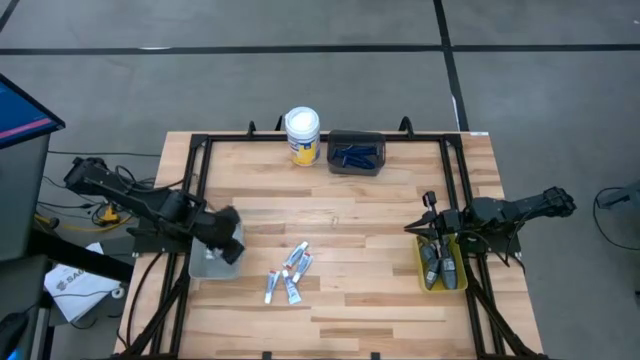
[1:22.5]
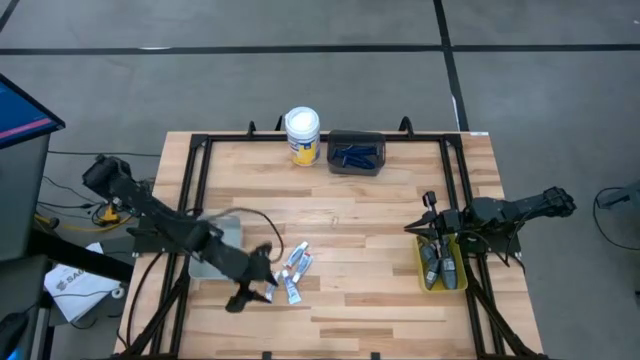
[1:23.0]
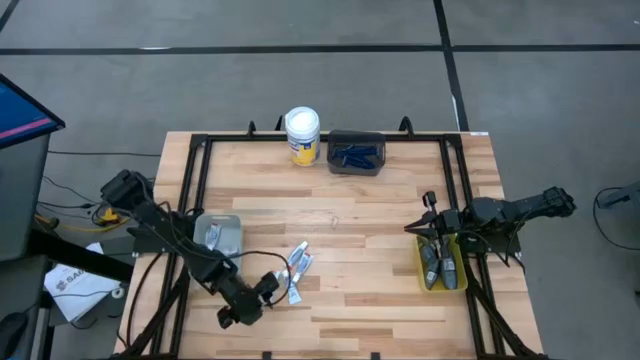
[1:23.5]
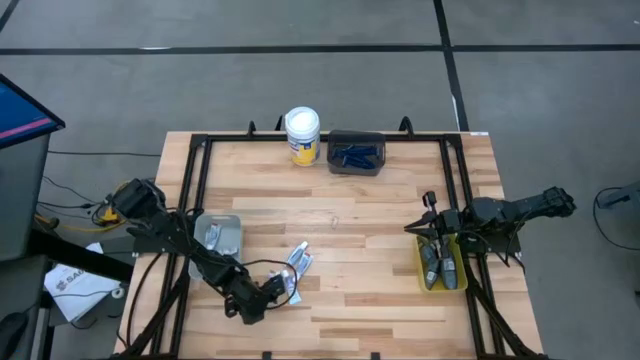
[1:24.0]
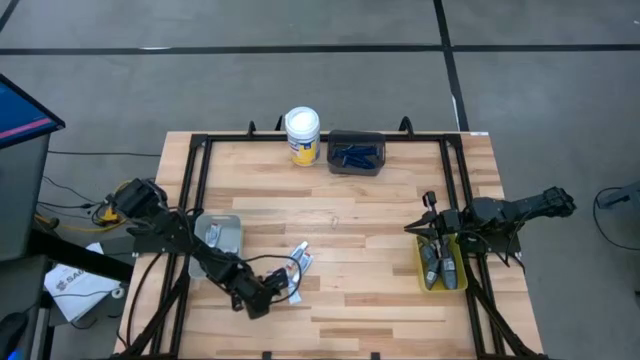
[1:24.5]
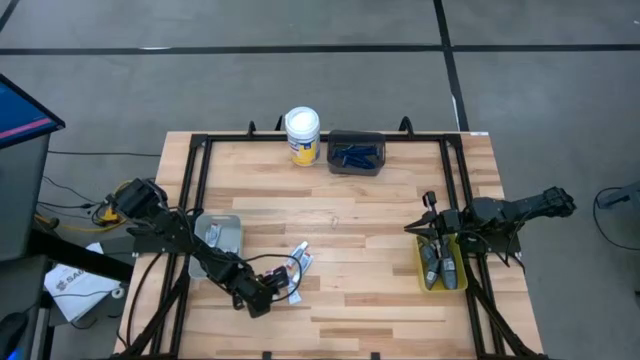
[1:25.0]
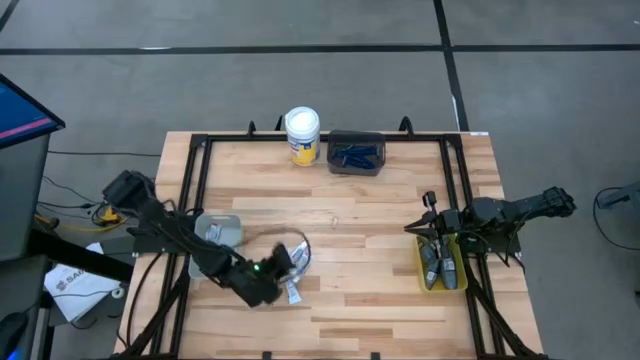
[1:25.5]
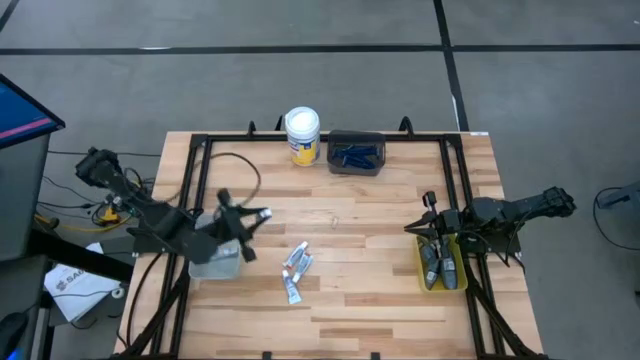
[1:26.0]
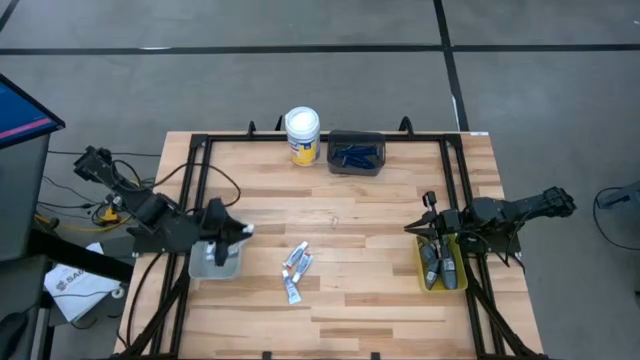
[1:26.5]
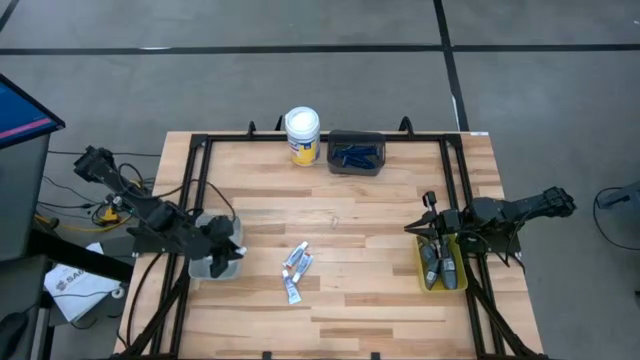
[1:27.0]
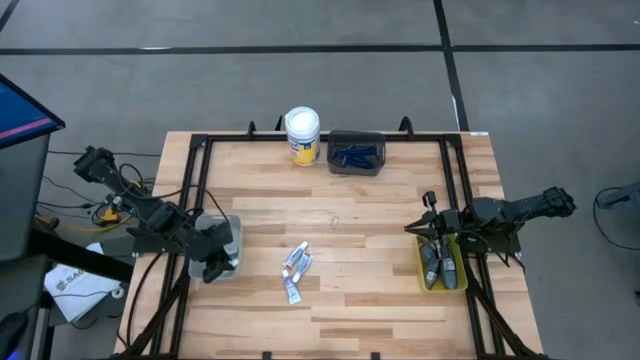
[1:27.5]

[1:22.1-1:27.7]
Task: Pick & Place Travel size toiletries
Put the white toothpaste into the gray bin

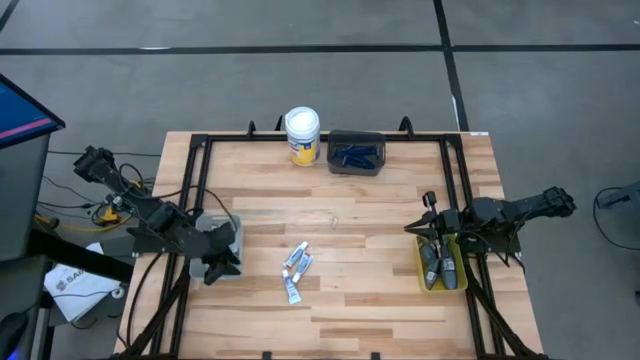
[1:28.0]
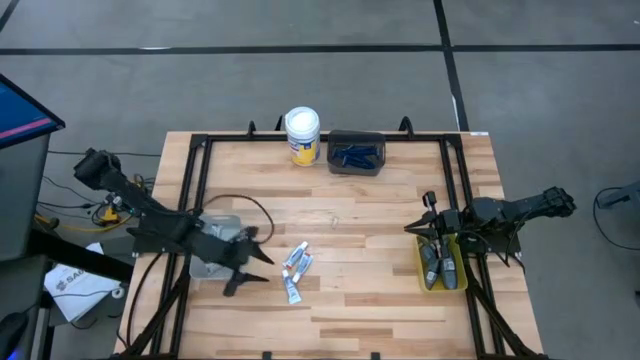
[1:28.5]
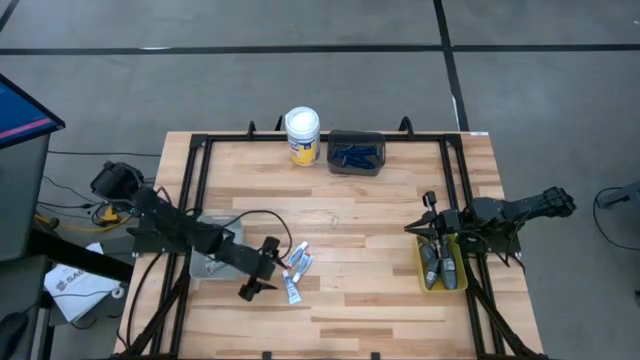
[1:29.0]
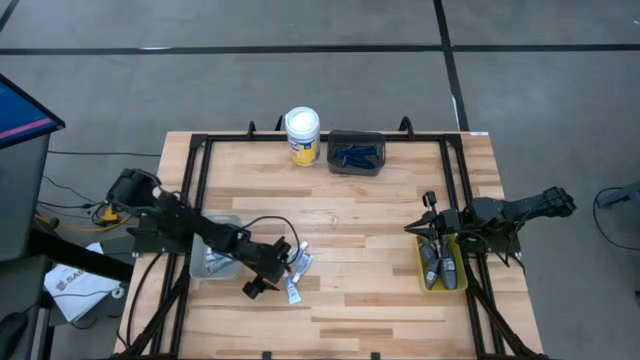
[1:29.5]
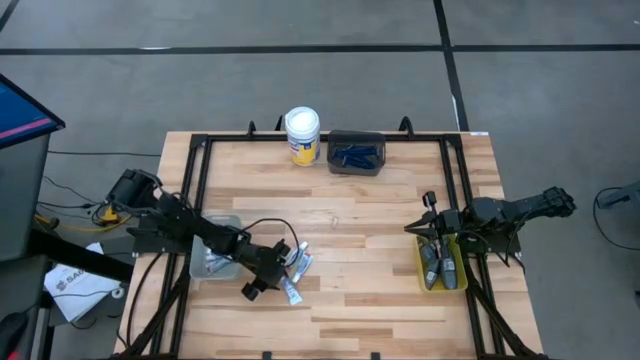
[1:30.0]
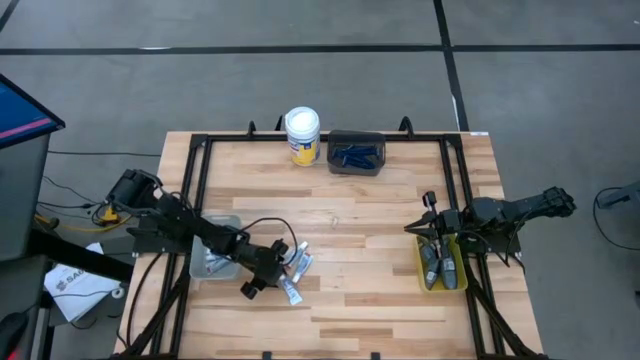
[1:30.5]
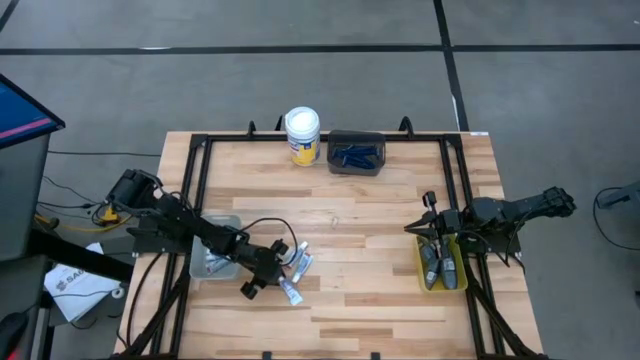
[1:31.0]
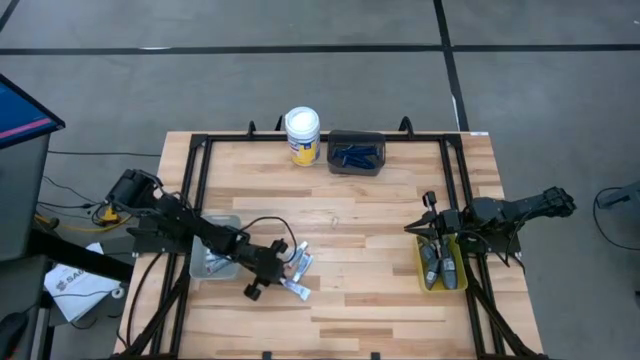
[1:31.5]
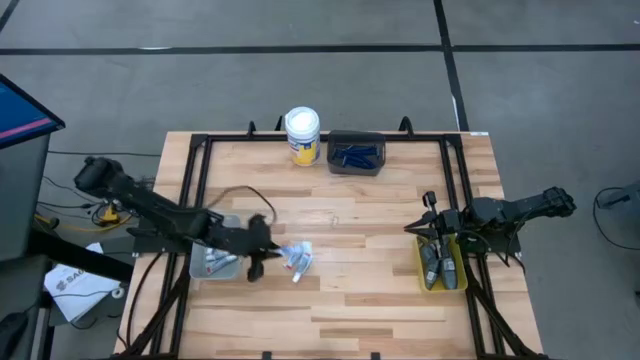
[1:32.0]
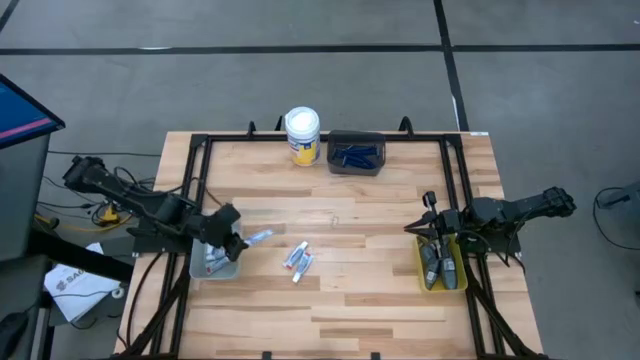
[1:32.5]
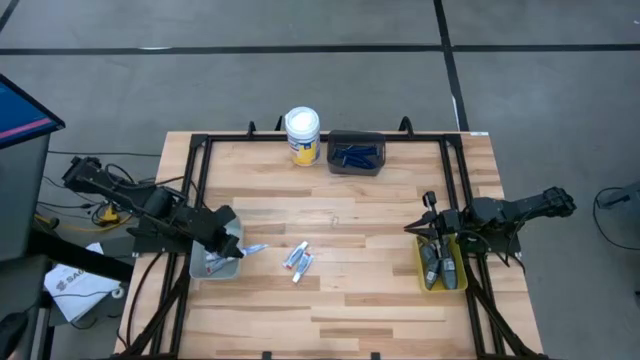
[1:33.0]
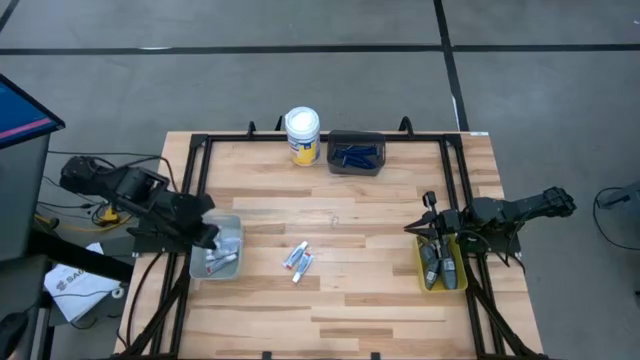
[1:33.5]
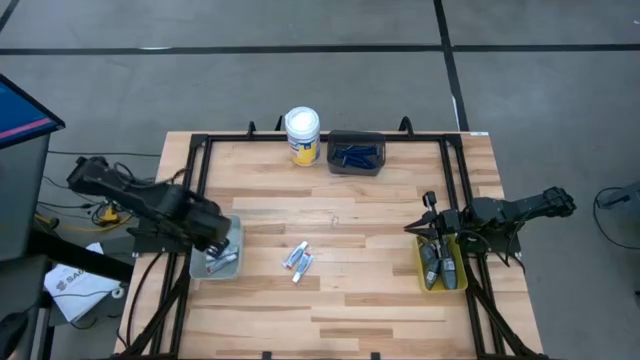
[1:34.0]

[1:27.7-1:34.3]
Put the white toothpaste into the gray bin

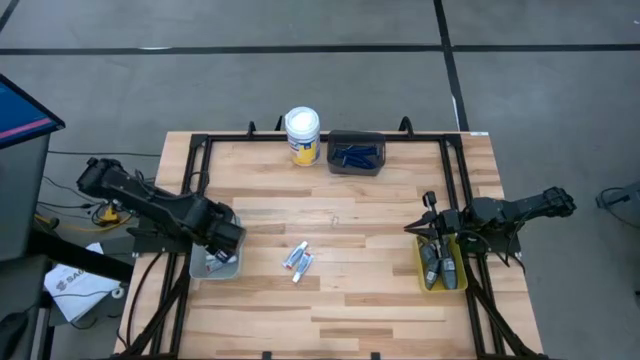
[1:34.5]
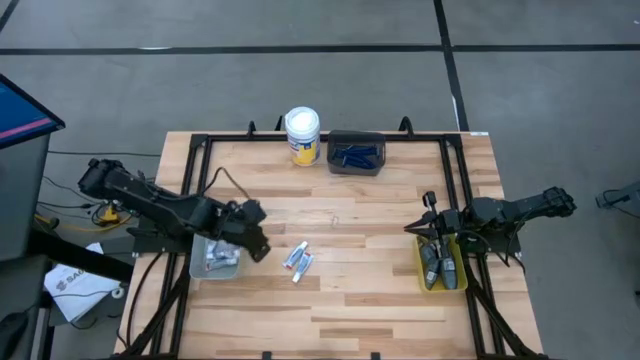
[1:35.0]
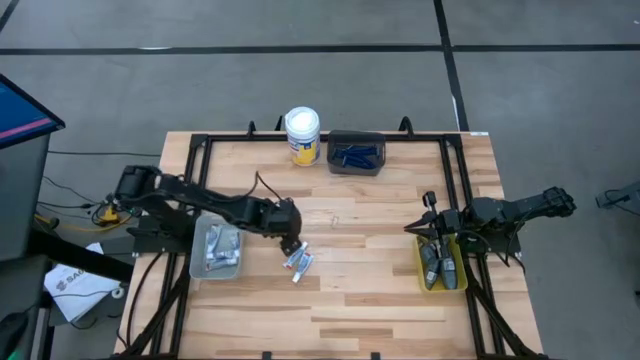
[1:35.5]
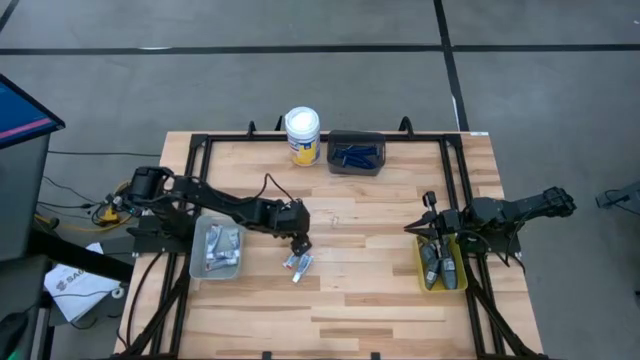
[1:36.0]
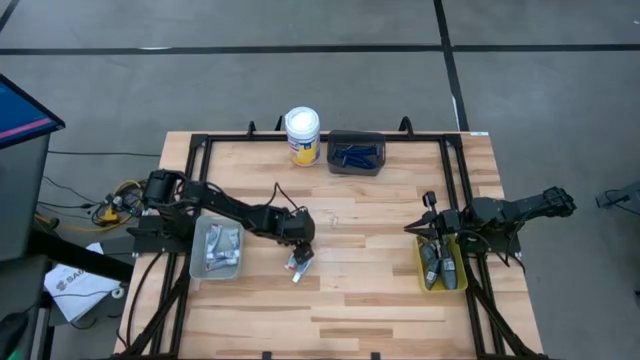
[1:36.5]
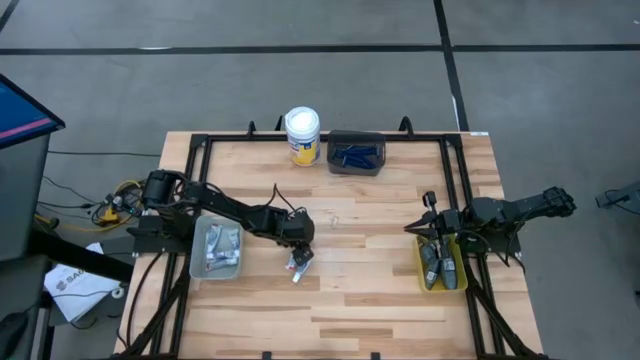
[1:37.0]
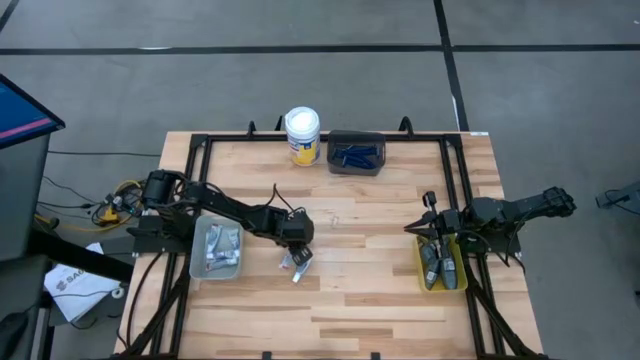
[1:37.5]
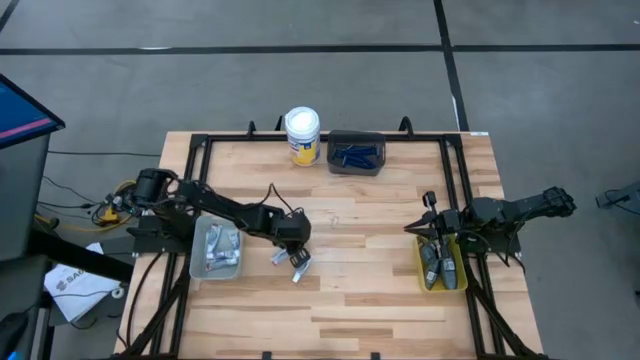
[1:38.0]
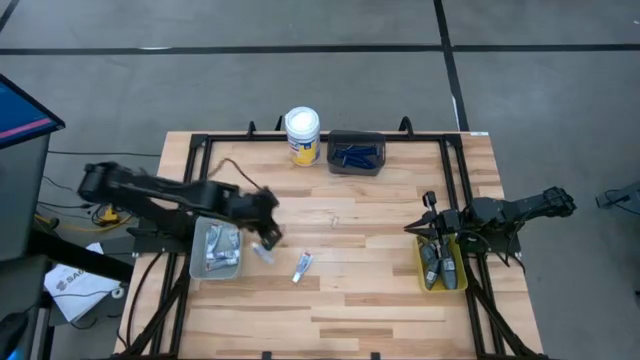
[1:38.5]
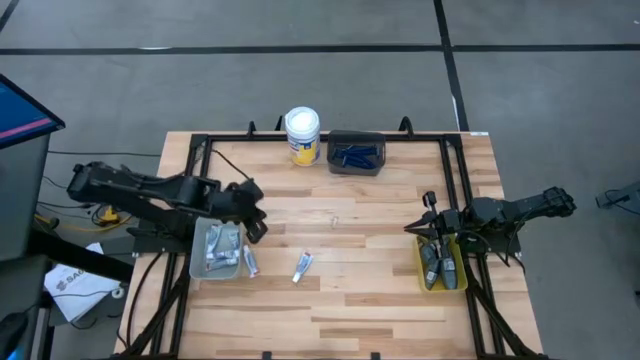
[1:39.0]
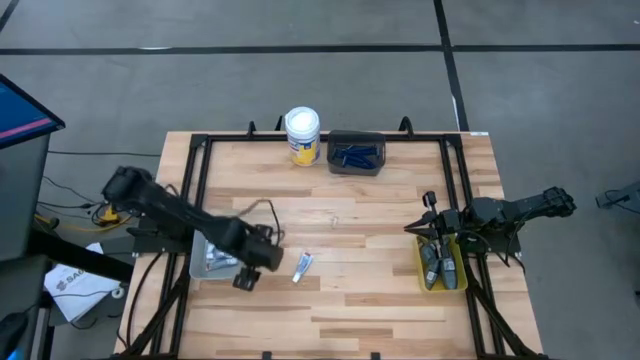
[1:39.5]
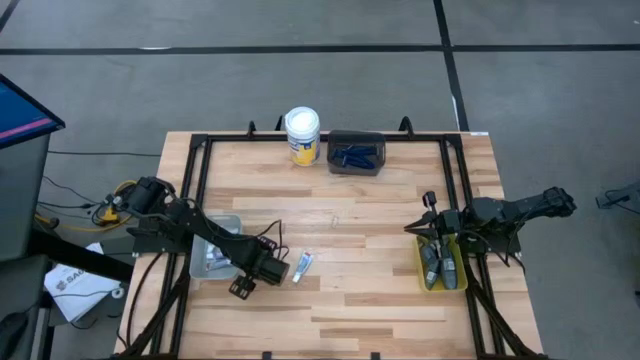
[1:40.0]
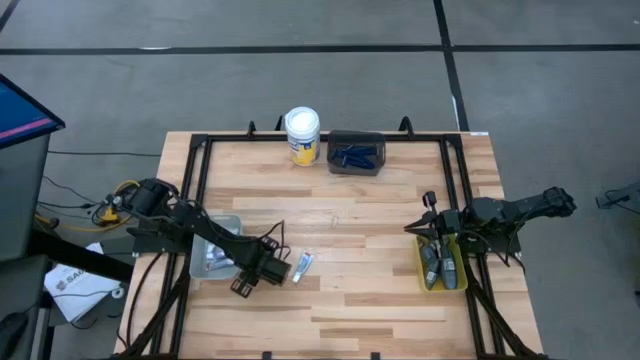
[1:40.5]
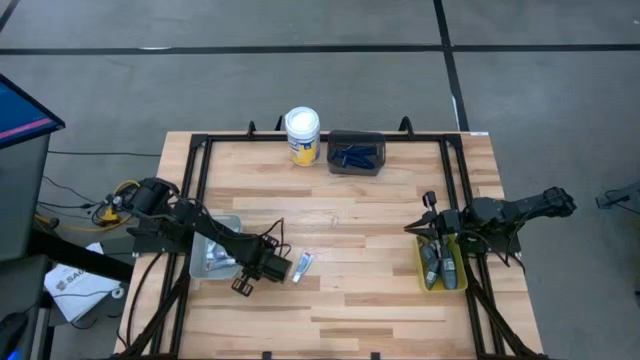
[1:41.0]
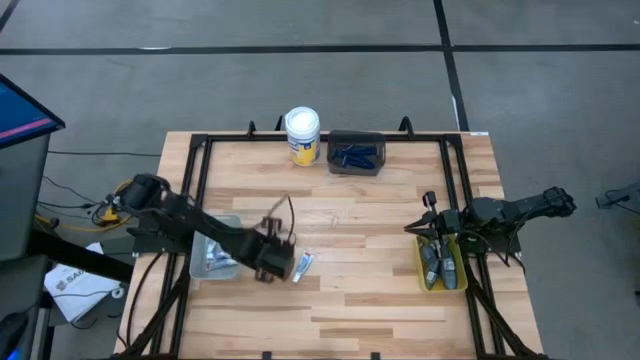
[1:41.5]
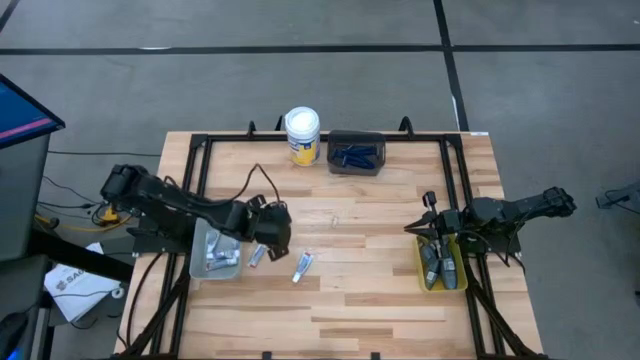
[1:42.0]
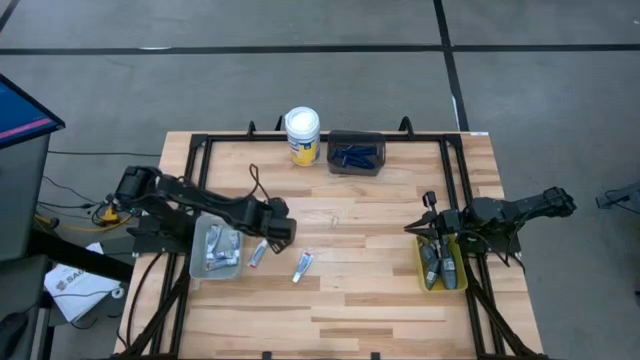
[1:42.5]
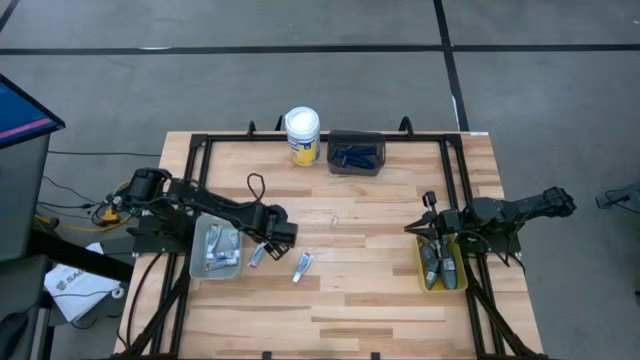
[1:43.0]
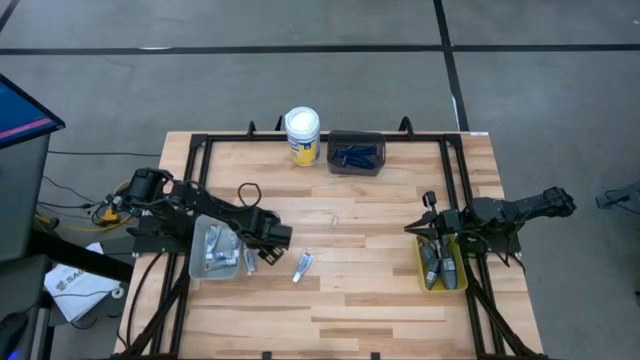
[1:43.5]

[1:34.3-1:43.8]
Put the white toothpaste into the gray bin
